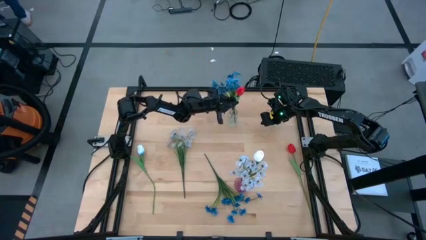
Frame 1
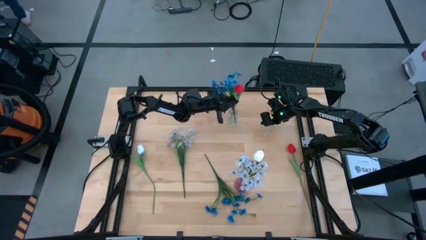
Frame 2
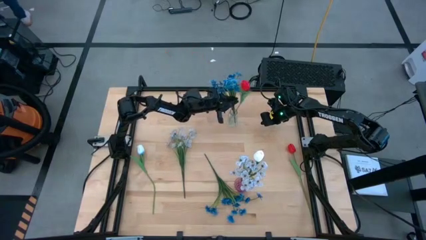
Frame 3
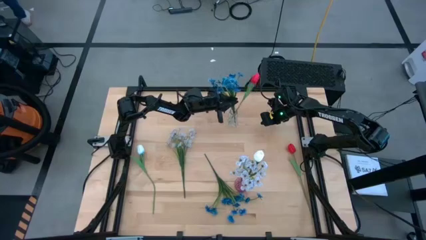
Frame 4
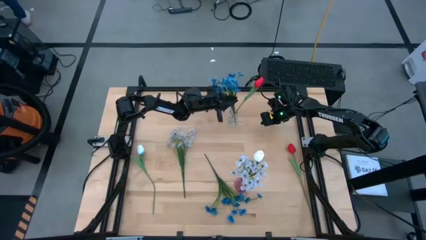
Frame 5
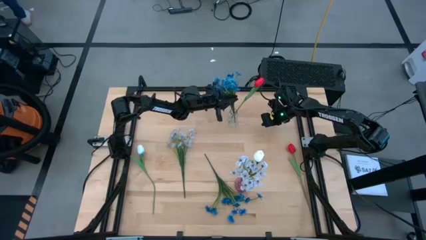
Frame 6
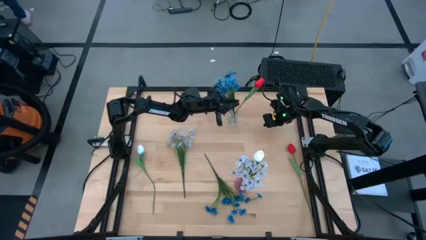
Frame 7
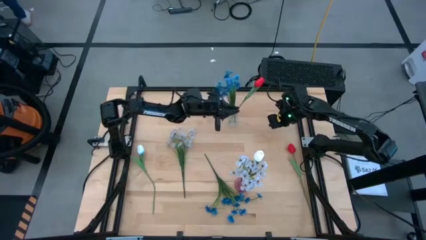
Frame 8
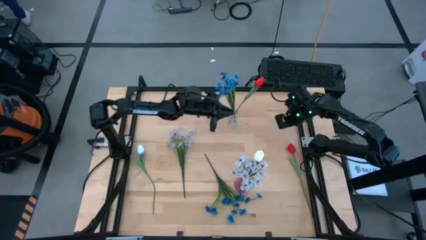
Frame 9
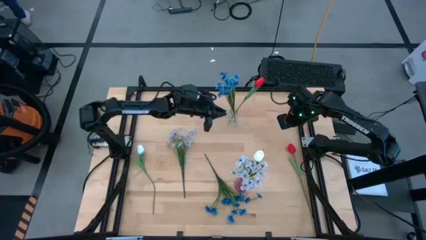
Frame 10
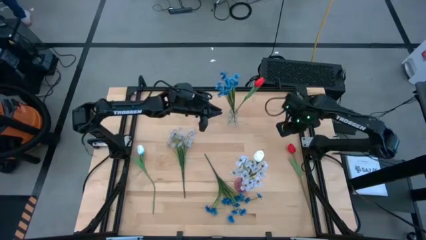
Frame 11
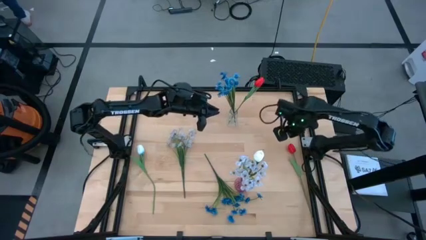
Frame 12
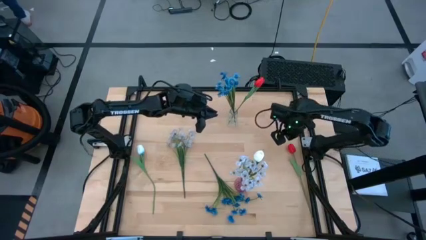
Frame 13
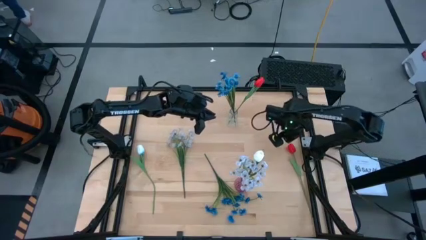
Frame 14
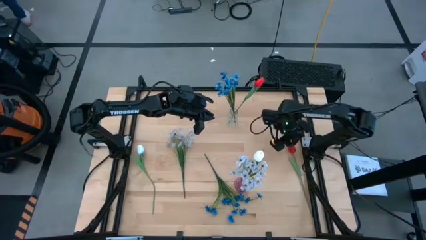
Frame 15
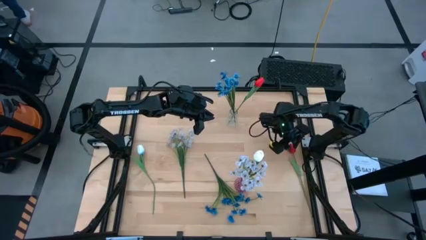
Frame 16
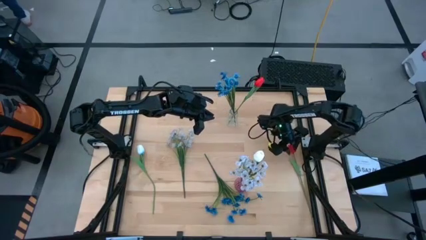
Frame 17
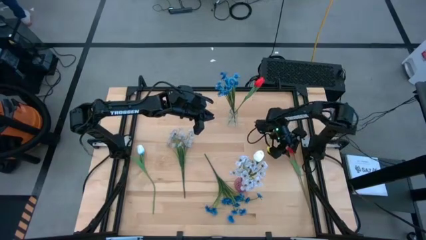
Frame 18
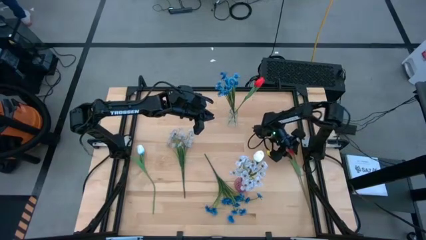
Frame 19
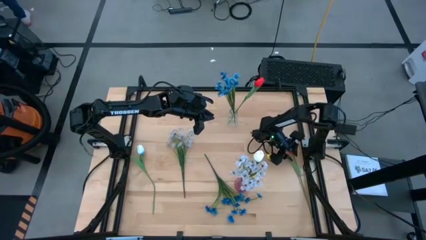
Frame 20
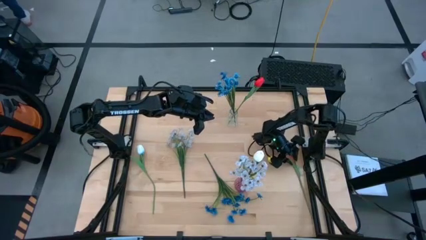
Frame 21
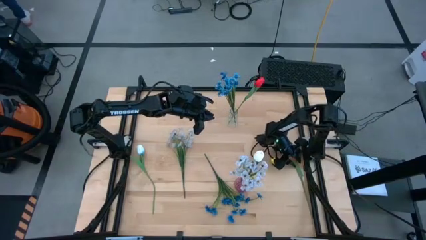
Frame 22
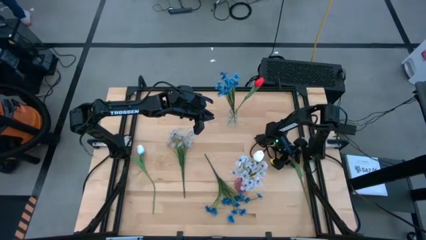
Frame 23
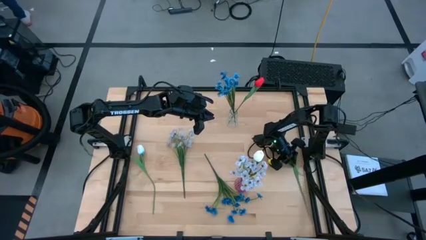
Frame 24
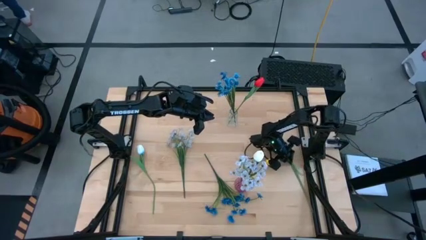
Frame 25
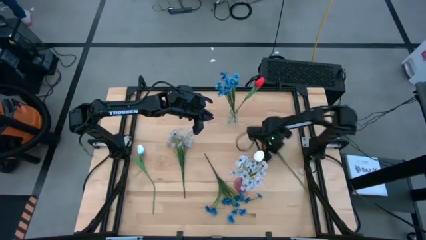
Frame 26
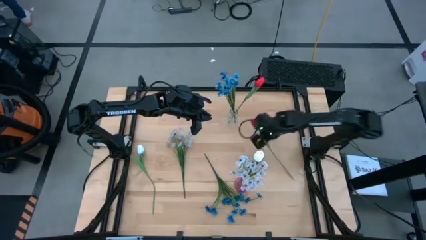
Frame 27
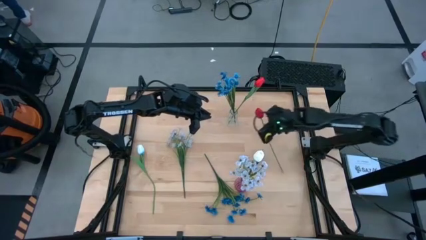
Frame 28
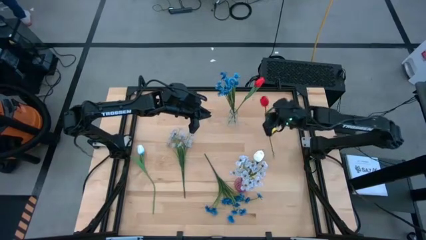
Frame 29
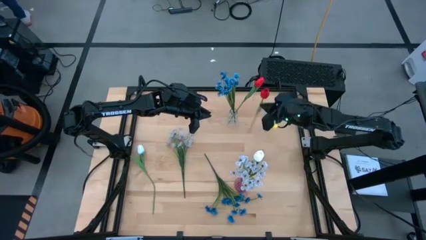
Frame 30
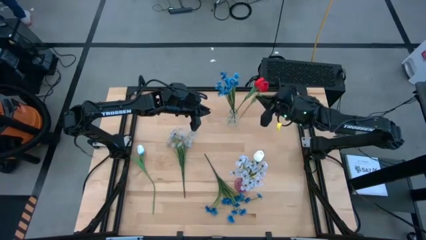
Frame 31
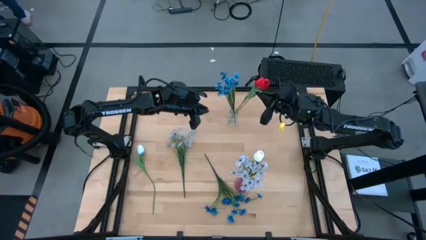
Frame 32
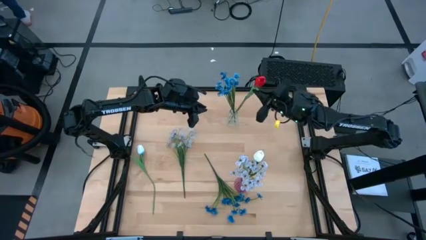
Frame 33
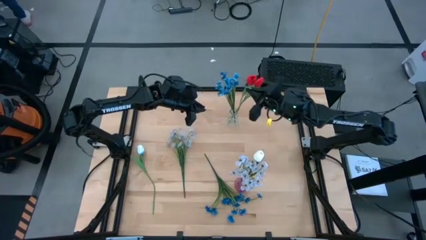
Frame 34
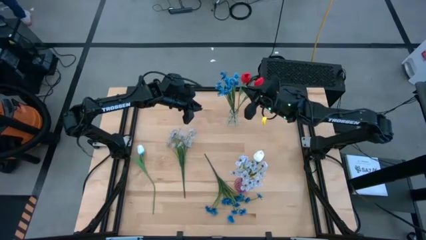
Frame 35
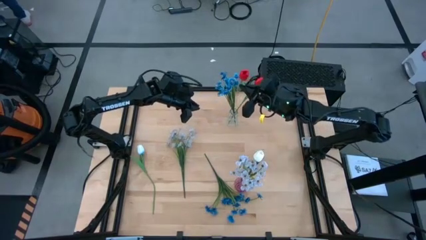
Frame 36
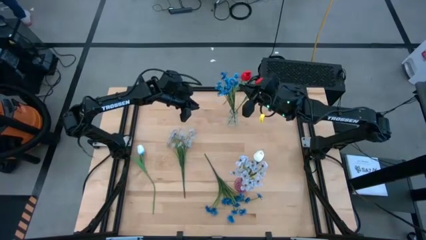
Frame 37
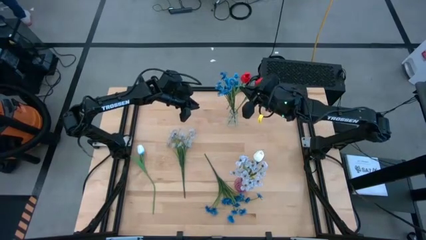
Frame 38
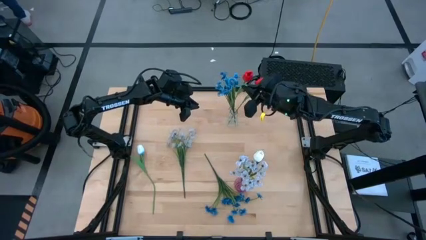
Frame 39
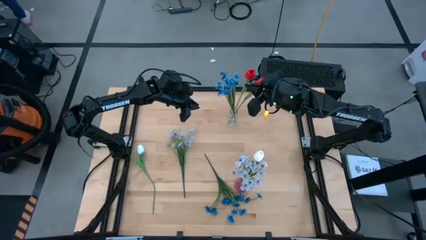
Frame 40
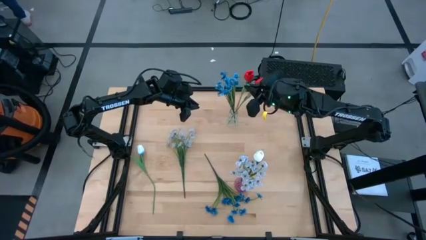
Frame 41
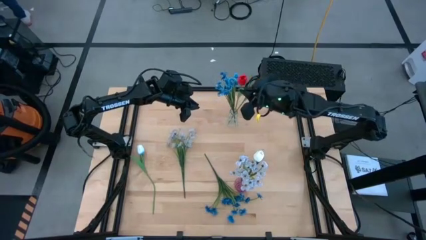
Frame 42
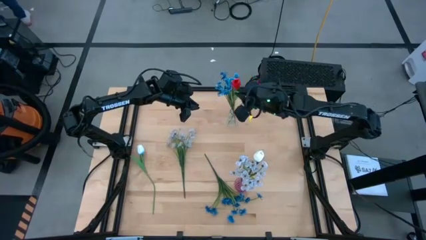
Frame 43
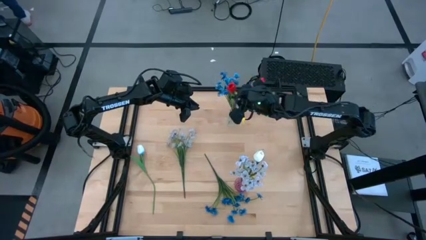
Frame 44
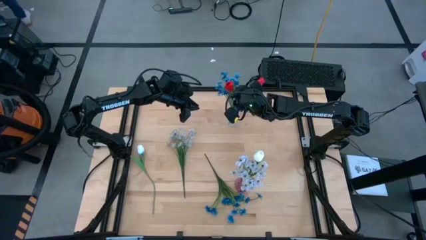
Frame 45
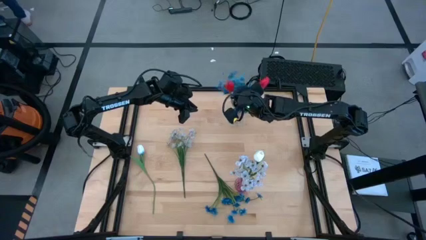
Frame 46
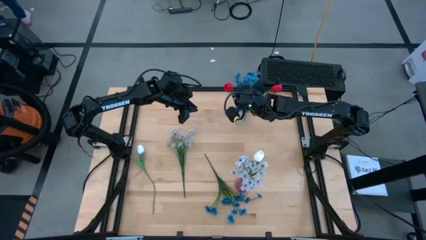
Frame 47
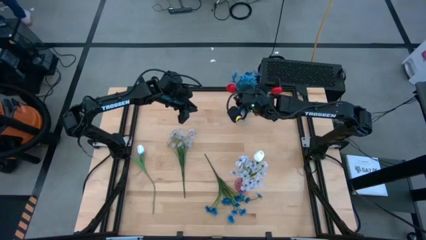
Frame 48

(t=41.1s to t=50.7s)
Task: Sort flowers into vase by color
Put the red flower into the transparent vase

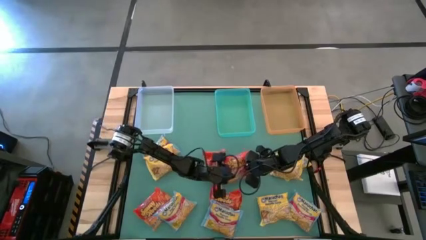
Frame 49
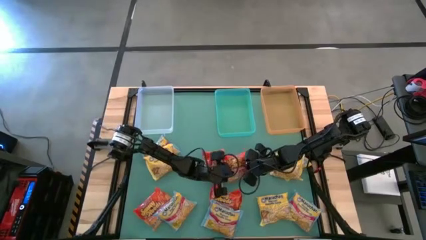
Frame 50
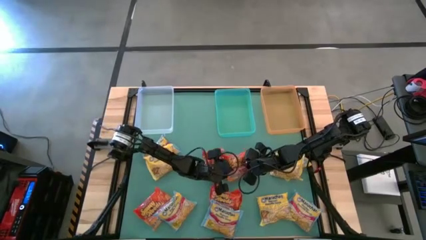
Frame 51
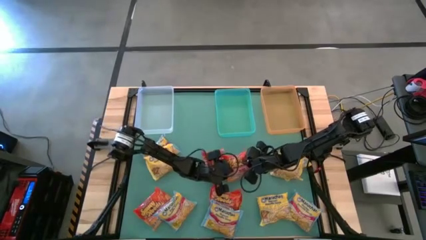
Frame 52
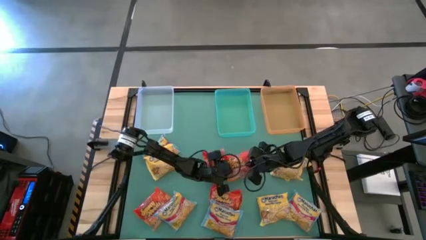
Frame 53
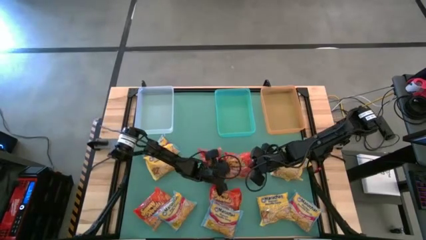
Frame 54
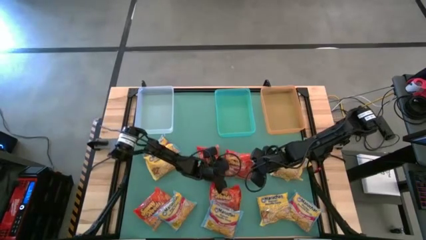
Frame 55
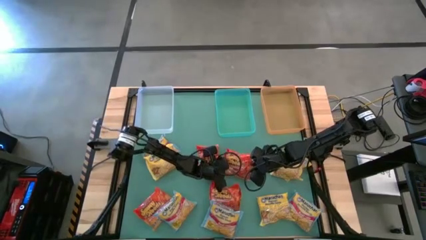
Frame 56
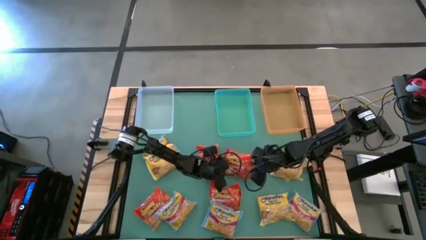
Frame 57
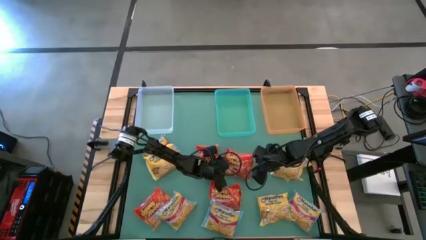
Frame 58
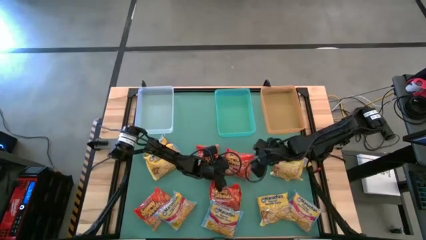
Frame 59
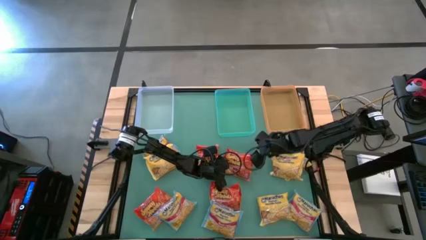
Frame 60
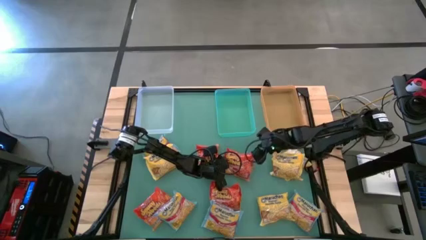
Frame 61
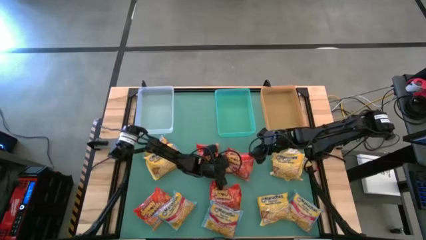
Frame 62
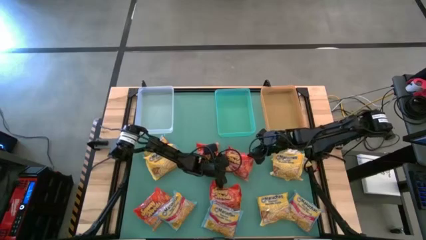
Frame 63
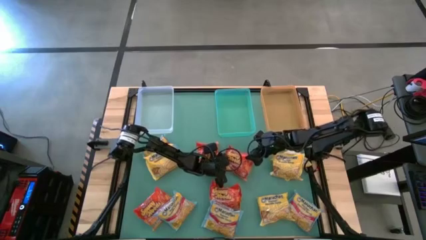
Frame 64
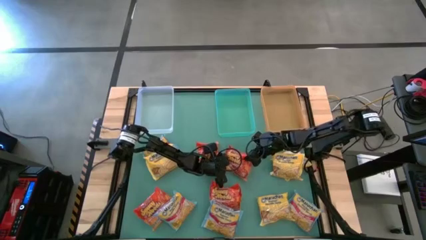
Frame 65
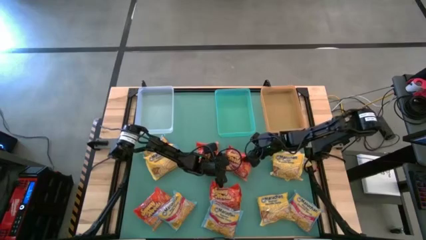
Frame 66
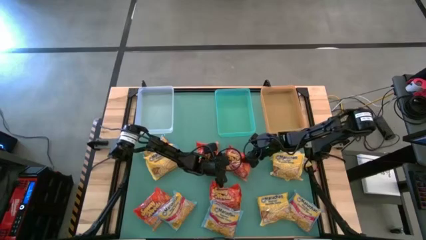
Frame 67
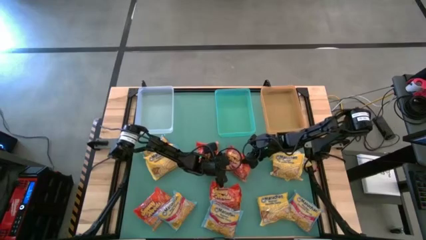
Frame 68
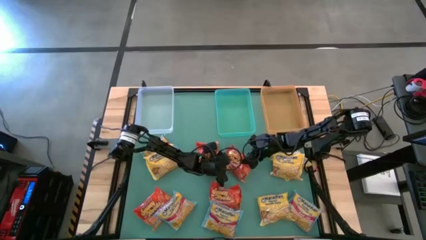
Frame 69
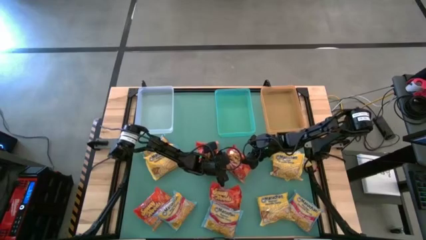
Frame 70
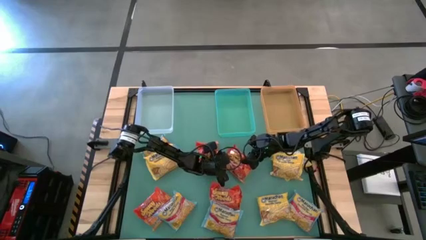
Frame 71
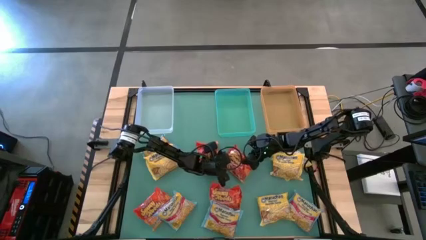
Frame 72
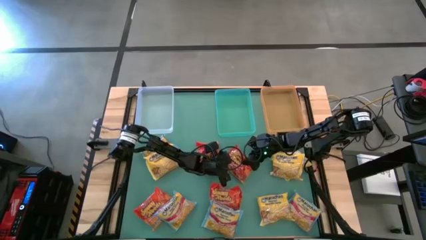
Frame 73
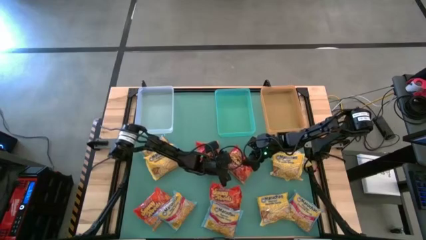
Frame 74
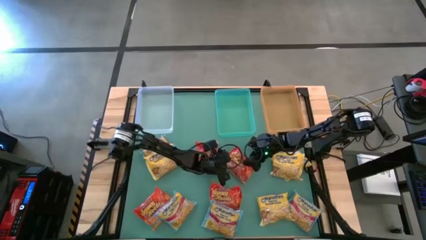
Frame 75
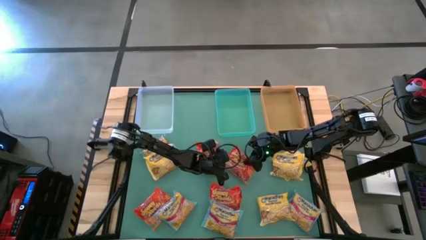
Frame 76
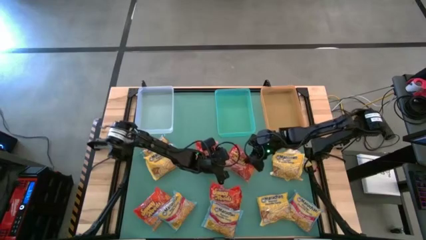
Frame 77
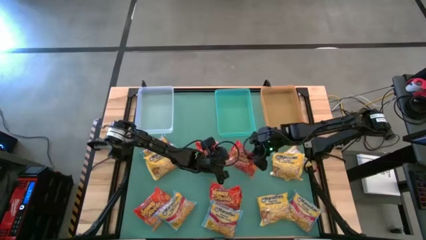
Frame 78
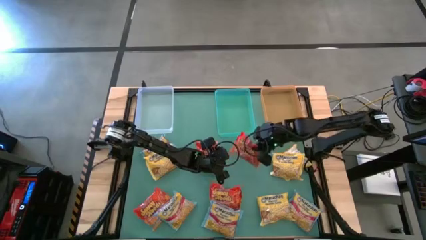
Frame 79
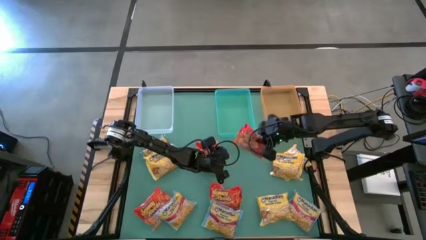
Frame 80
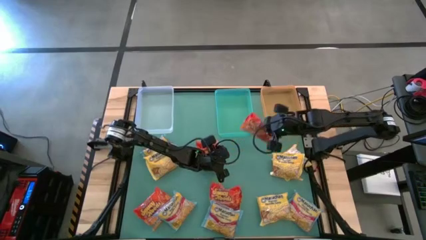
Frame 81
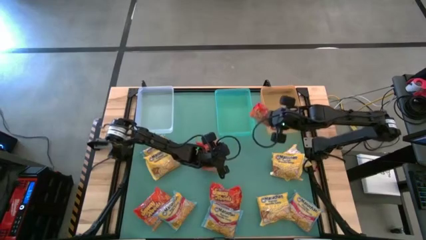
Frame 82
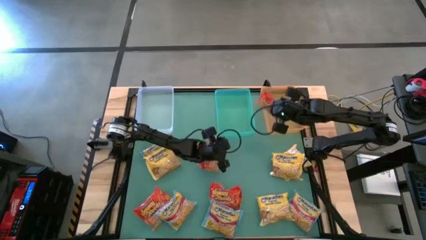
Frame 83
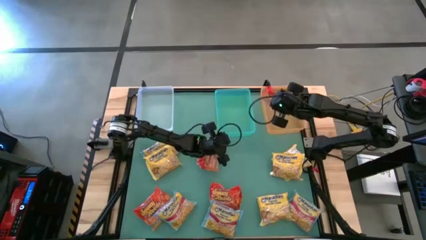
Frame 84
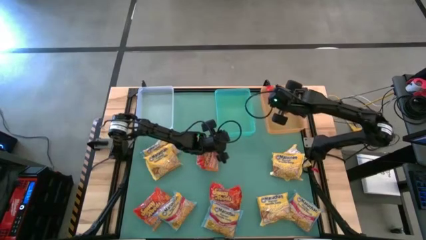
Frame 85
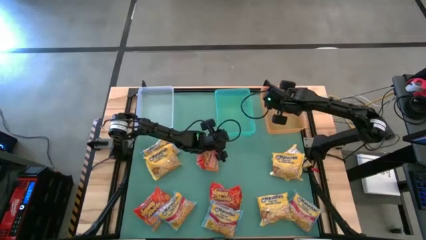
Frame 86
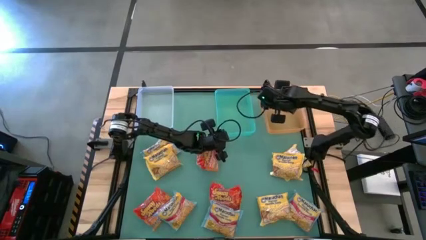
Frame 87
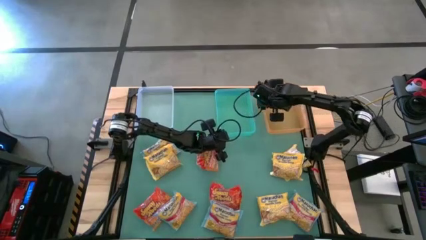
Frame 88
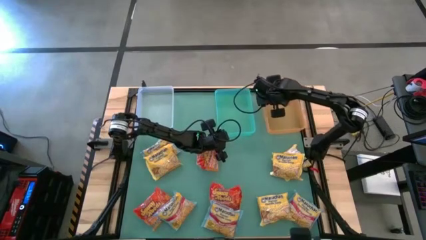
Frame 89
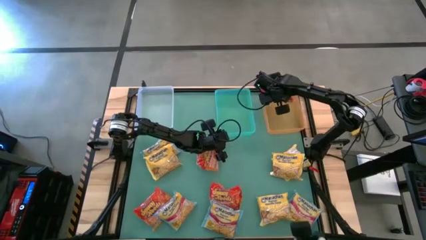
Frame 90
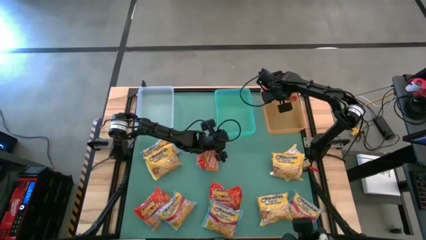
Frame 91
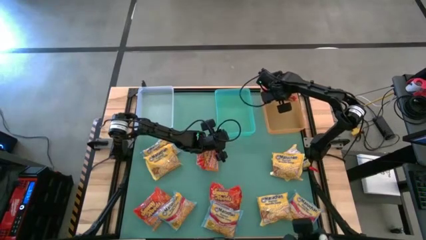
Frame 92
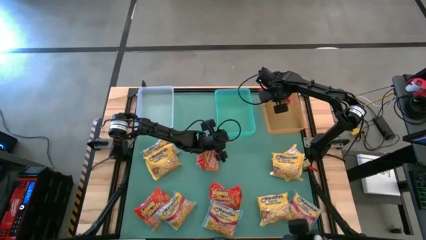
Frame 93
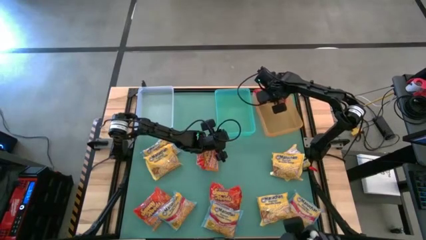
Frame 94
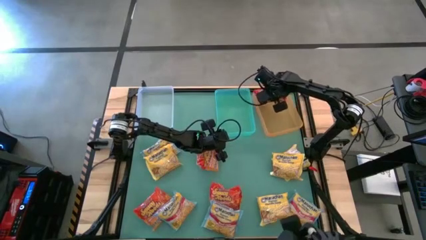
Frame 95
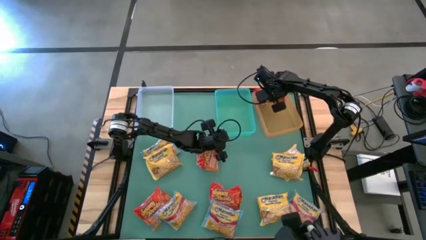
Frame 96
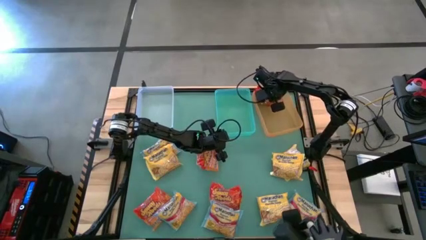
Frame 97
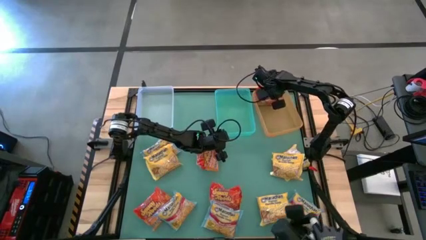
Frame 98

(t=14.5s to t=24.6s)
Task: Sort Maruchan noodles
Put the orange noodle pack into the orange bin
